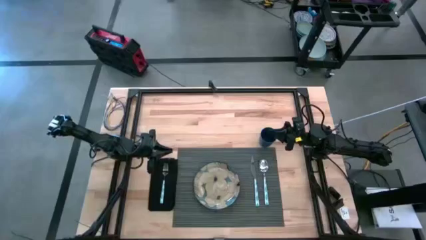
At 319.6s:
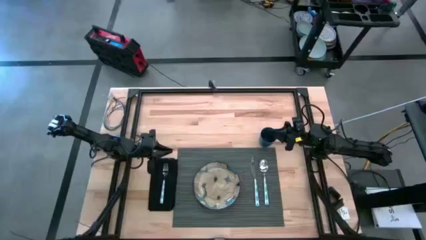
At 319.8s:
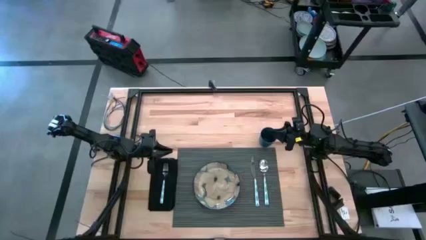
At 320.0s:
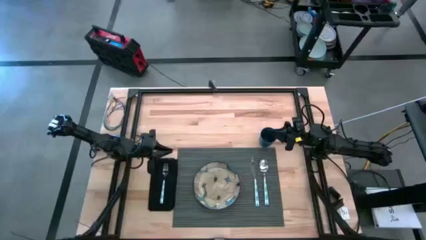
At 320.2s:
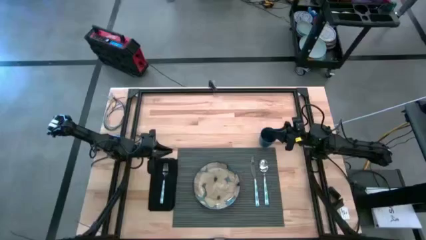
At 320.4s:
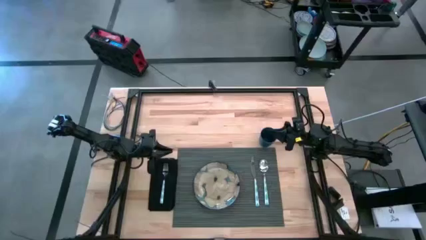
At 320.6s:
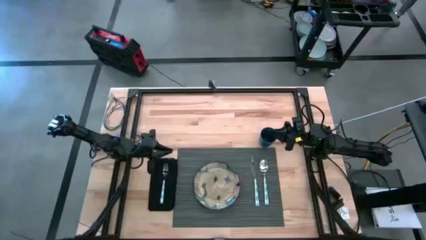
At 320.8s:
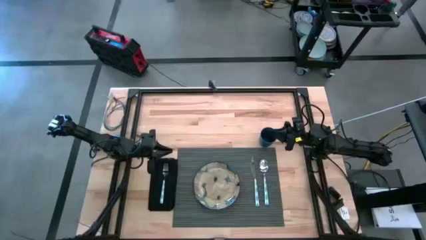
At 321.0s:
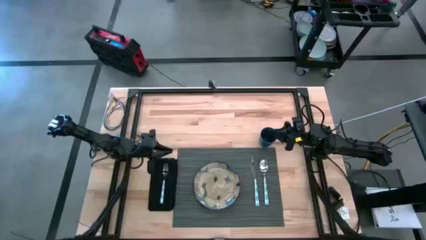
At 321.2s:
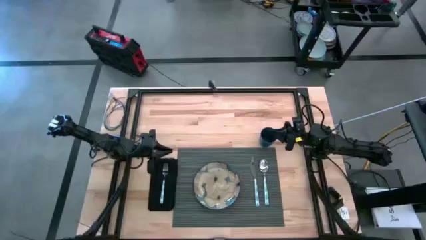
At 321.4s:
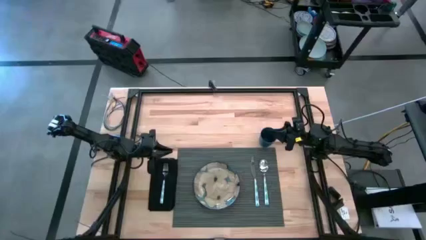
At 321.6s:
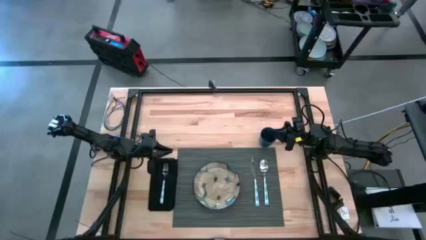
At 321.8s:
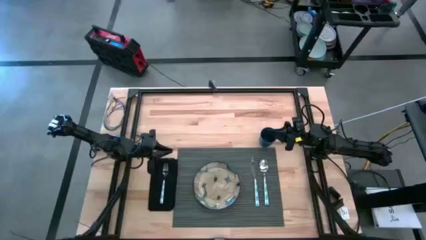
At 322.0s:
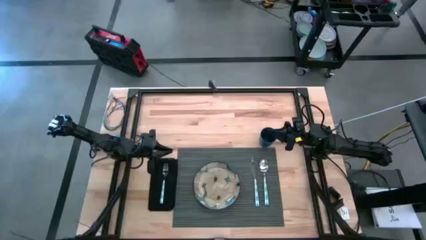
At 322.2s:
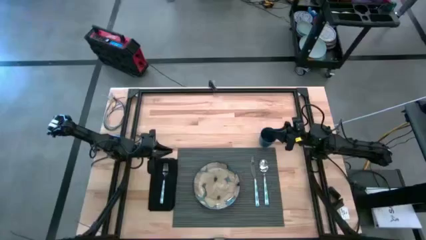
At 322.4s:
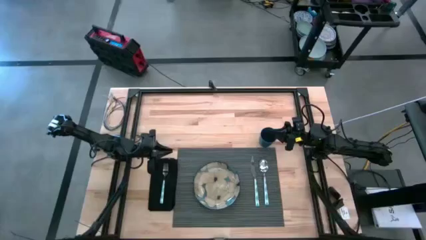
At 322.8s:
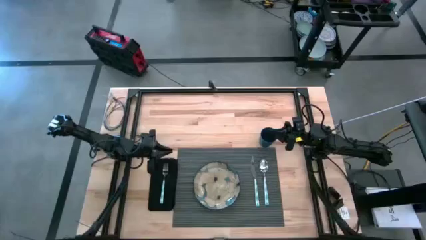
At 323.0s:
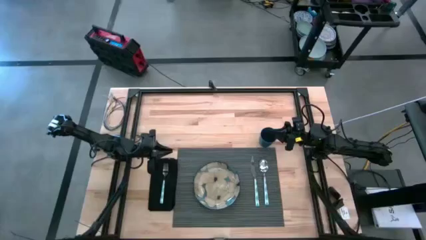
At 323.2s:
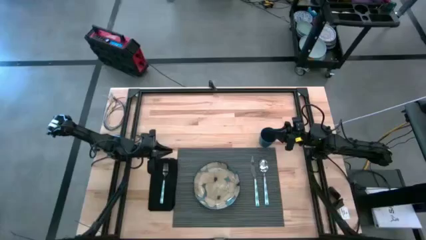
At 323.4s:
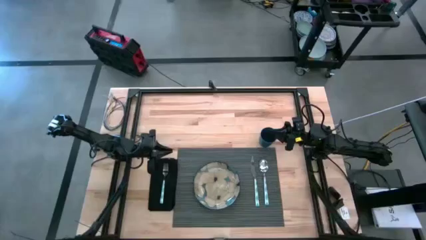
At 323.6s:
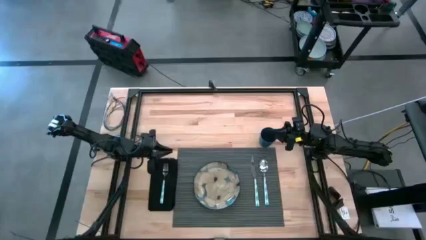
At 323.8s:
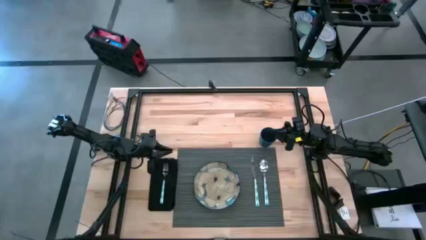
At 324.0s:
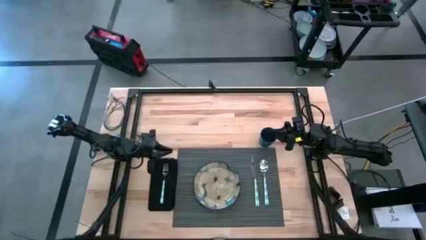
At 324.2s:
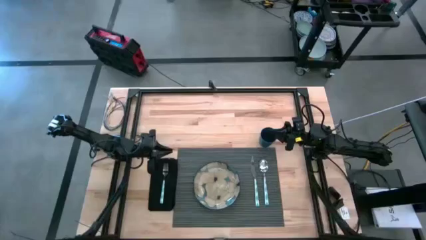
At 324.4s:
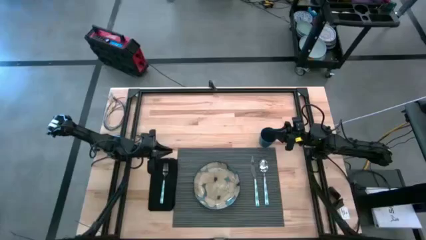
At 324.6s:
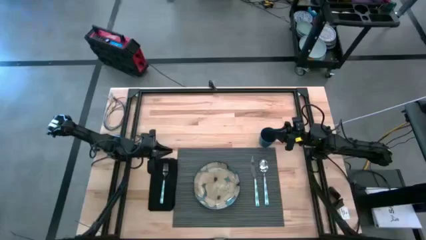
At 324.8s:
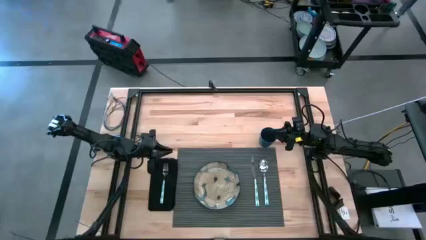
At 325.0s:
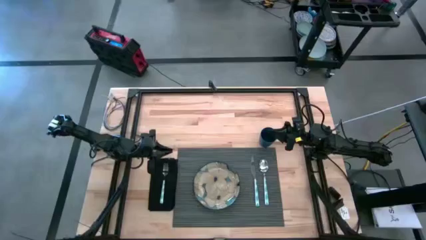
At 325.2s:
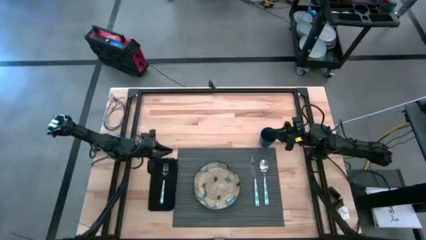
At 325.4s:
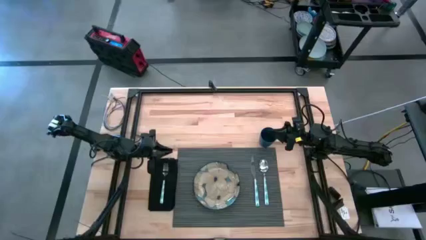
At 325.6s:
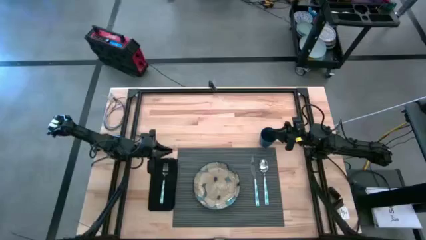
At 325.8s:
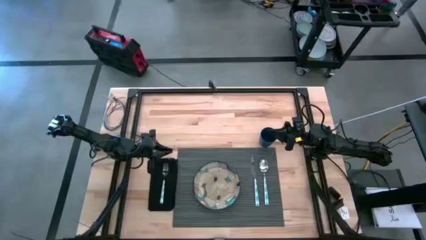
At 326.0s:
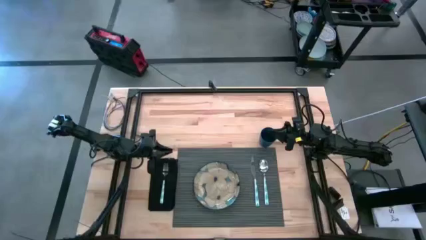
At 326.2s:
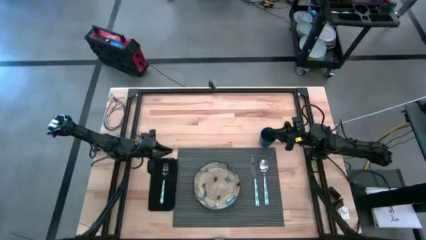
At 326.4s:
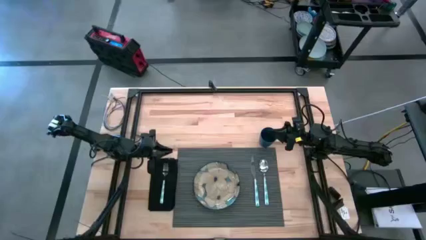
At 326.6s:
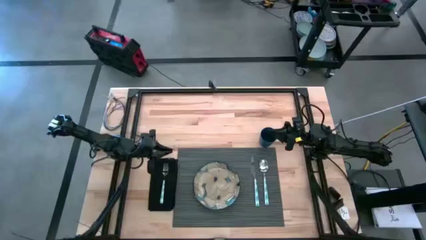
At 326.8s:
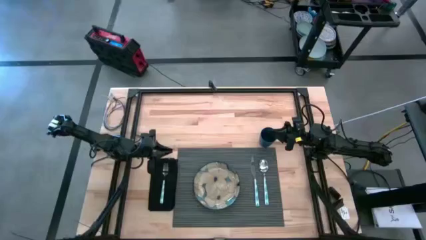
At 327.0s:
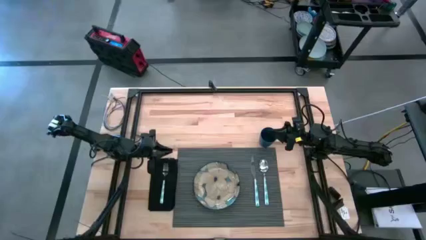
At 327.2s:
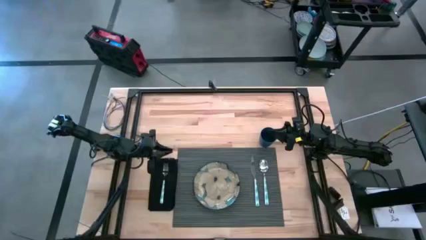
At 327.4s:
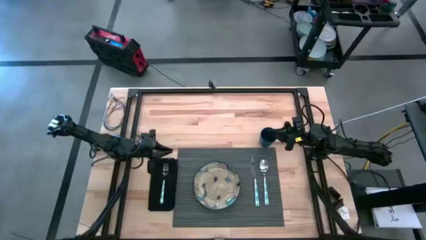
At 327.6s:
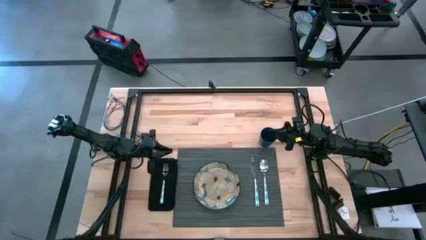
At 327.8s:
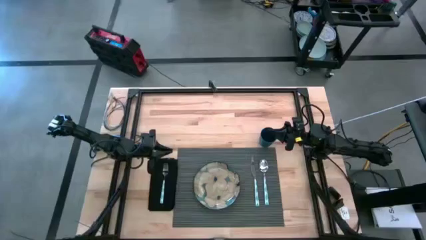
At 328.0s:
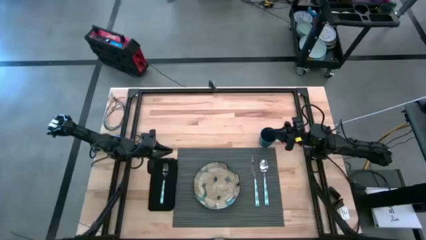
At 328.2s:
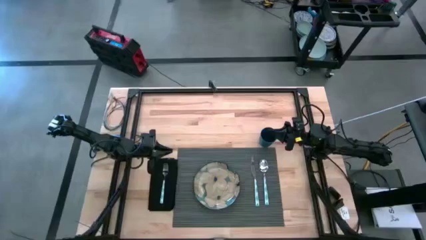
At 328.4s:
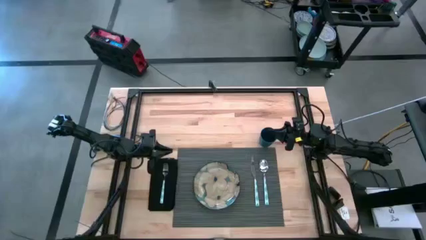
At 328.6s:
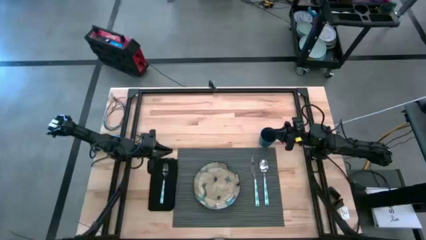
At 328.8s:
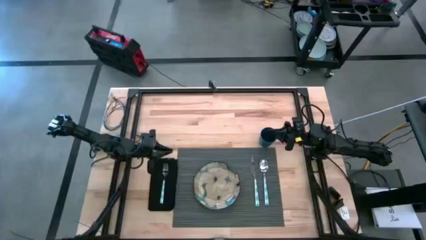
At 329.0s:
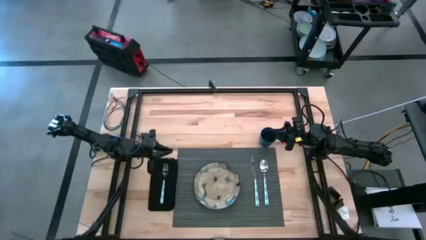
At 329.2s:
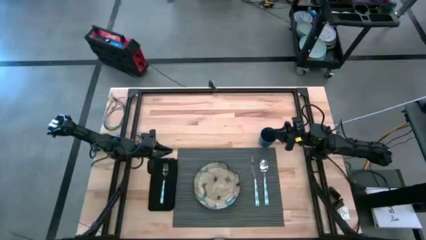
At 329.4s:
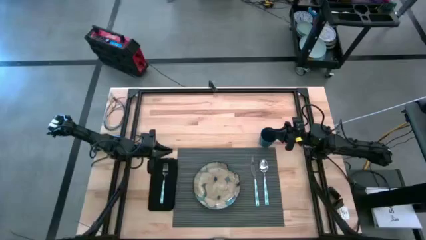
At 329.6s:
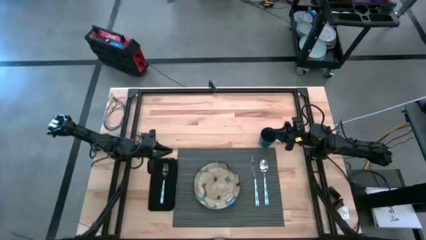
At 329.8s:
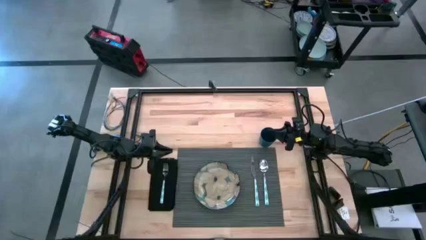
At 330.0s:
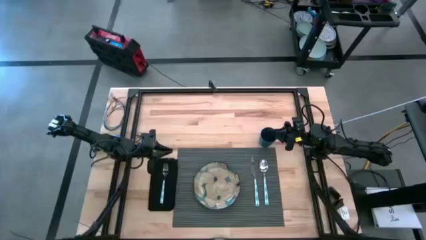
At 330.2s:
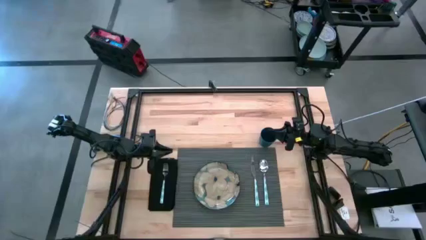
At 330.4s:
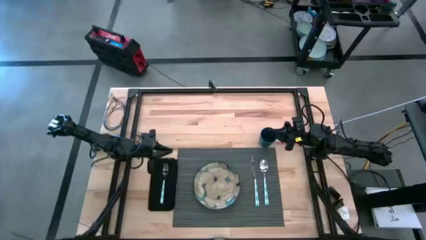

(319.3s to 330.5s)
Task: Set table place
Return to Home Position

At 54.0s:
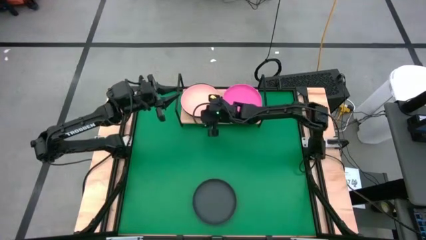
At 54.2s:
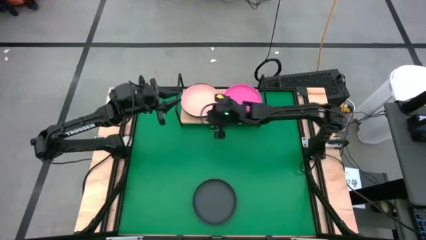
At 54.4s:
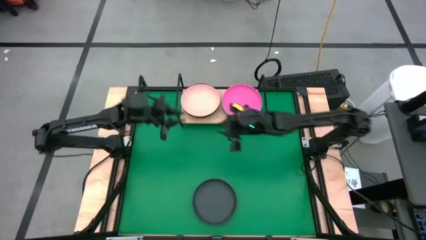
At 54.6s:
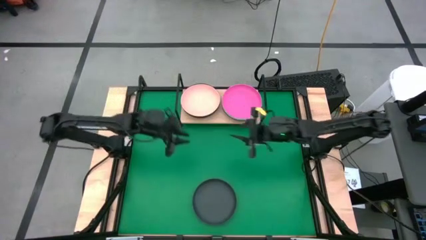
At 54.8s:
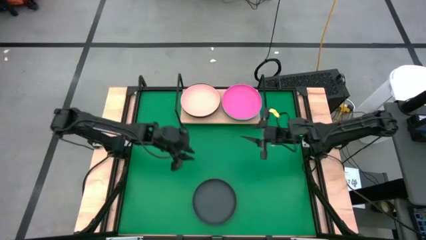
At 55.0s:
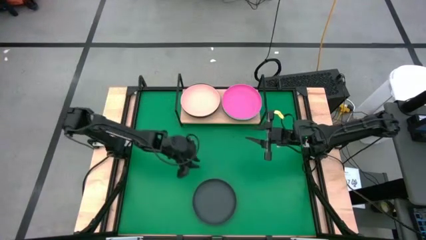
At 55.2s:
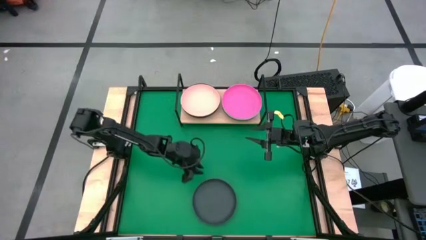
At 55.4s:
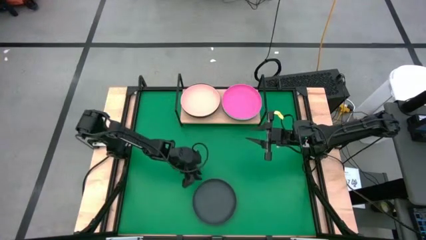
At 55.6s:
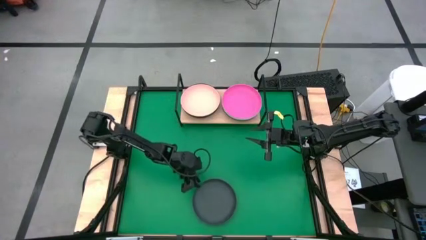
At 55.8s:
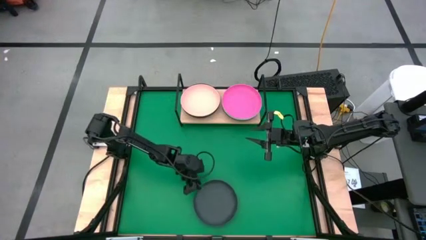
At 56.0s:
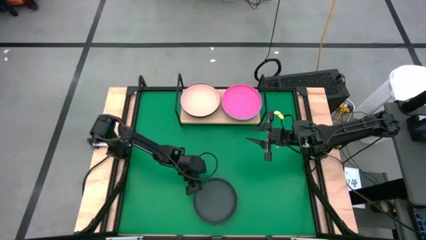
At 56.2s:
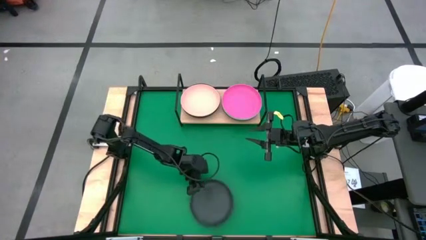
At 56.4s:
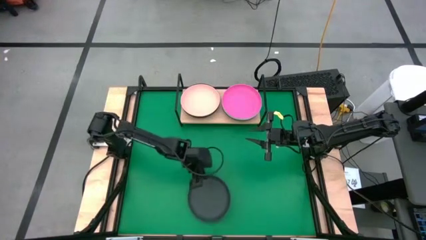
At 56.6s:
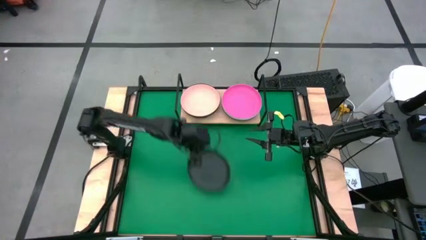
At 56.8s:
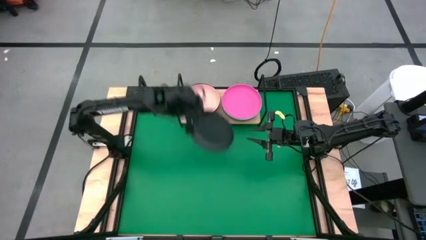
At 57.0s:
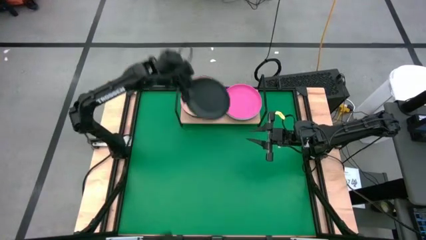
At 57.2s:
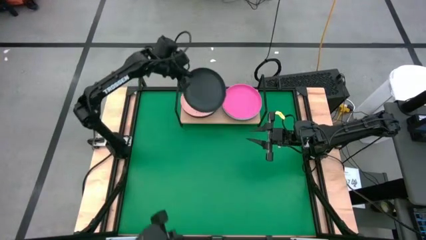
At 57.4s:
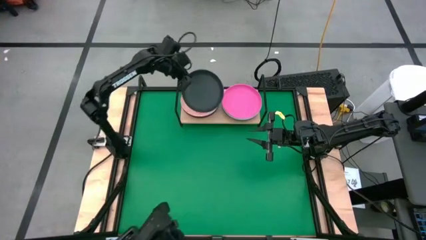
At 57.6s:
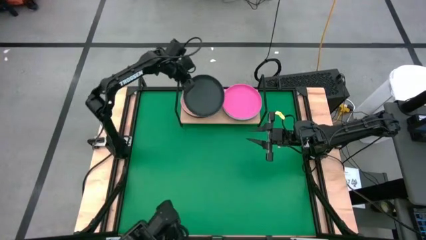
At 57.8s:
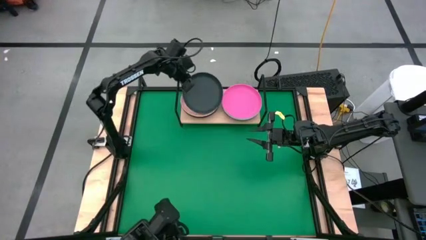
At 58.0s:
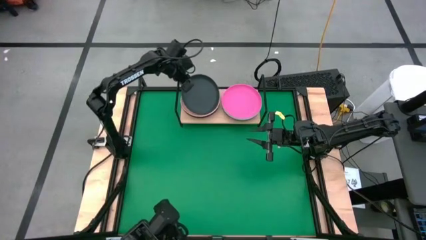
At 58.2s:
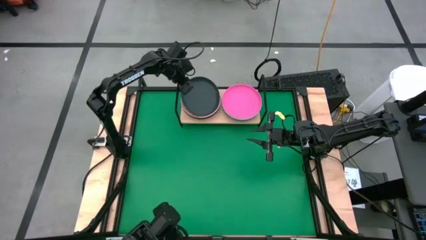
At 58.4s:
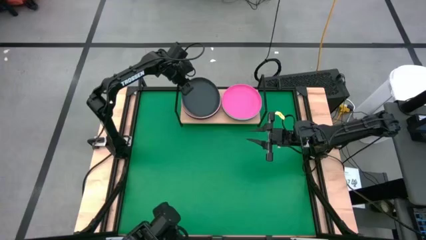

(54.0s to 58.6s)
Task: Place and stack plates onto a shelf
Stack the black plate on top of the light orange plate on the shelf
